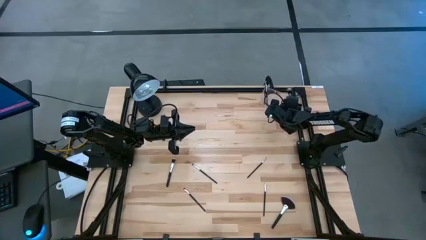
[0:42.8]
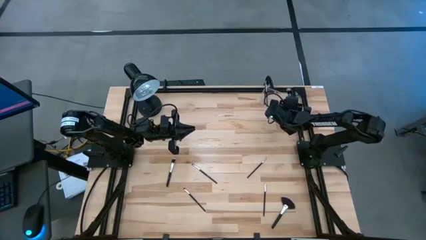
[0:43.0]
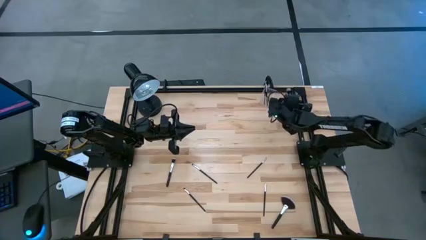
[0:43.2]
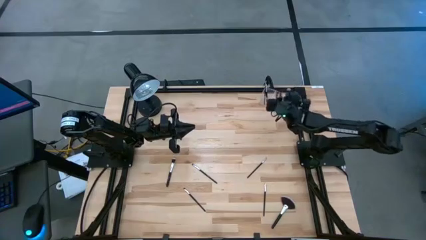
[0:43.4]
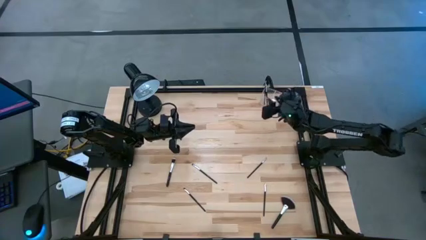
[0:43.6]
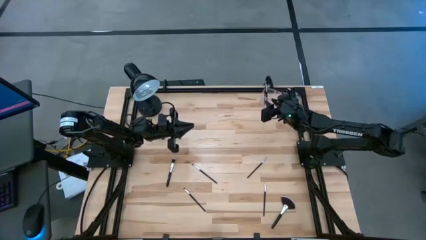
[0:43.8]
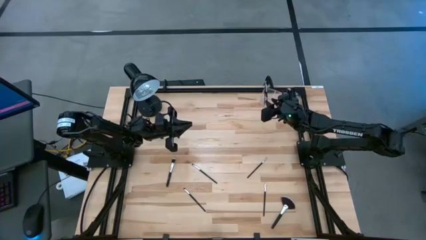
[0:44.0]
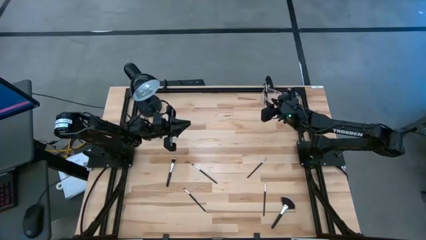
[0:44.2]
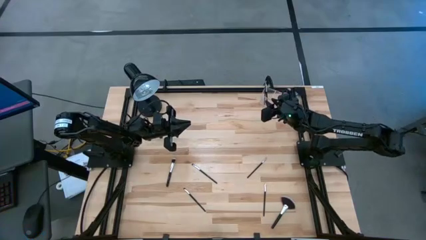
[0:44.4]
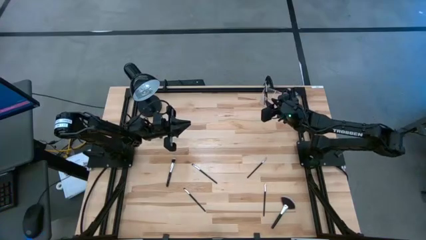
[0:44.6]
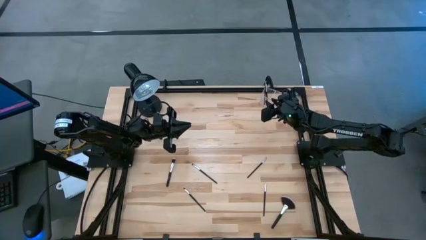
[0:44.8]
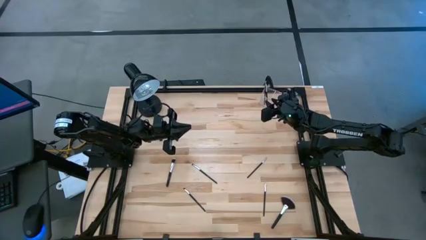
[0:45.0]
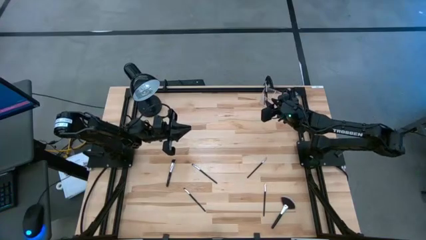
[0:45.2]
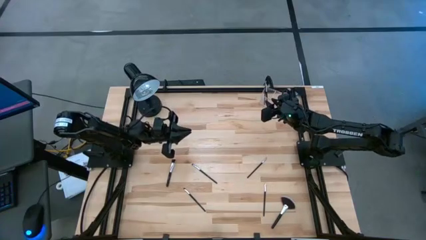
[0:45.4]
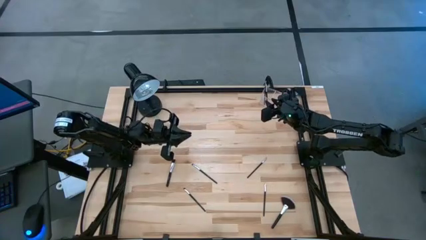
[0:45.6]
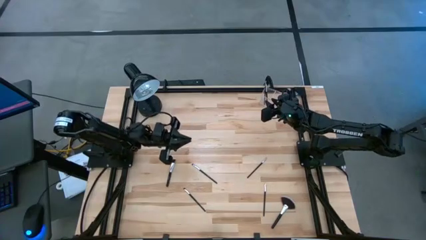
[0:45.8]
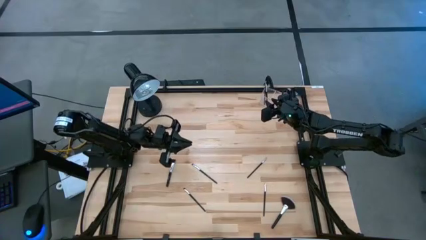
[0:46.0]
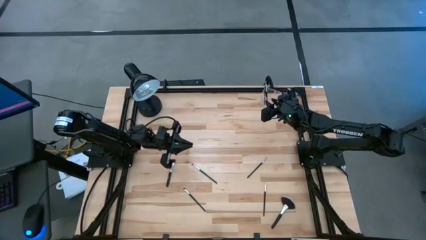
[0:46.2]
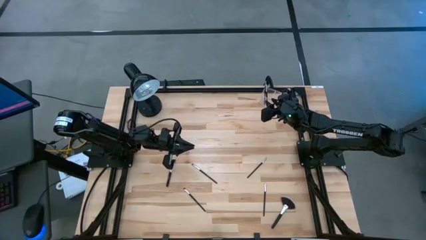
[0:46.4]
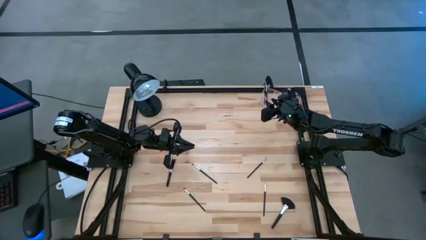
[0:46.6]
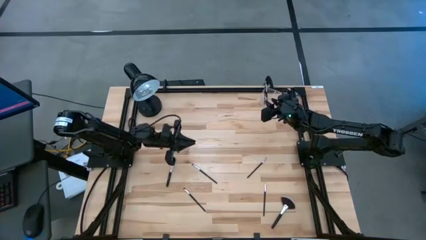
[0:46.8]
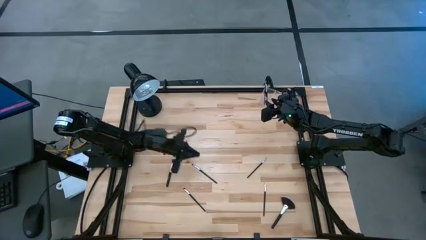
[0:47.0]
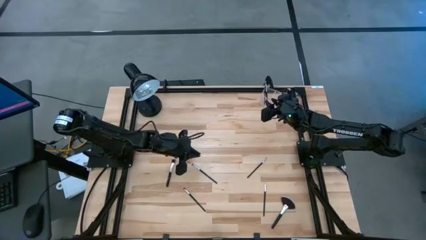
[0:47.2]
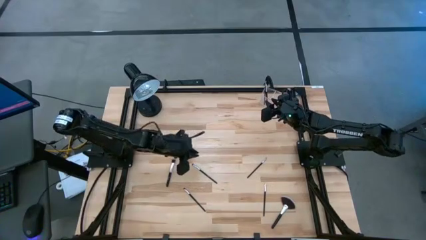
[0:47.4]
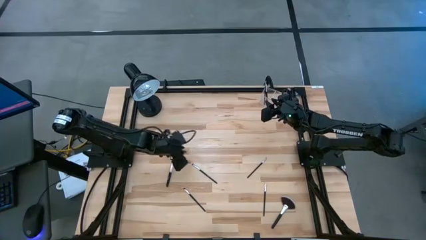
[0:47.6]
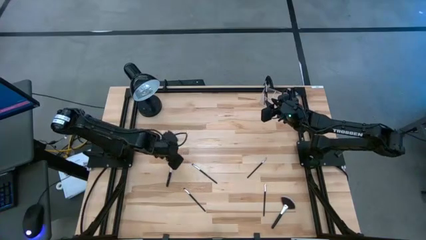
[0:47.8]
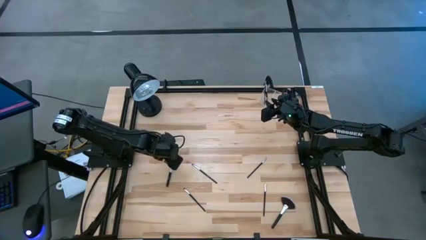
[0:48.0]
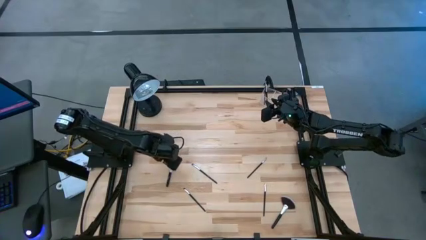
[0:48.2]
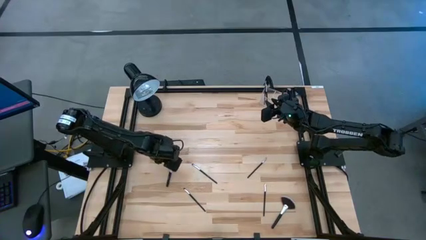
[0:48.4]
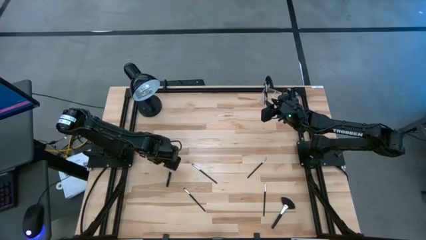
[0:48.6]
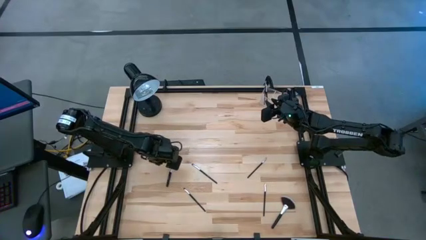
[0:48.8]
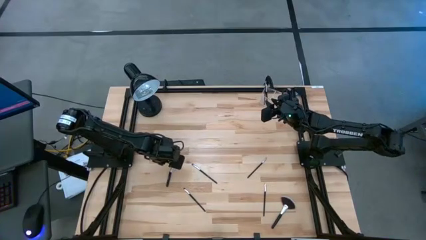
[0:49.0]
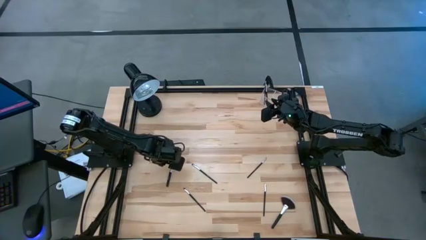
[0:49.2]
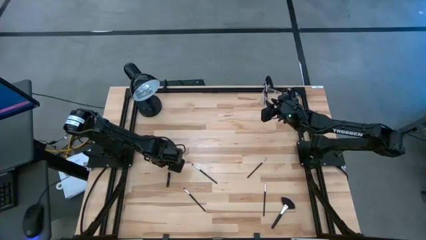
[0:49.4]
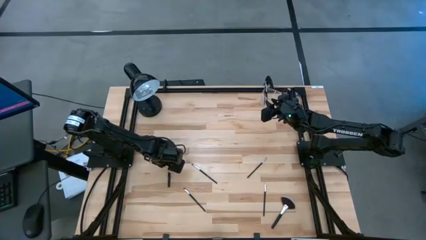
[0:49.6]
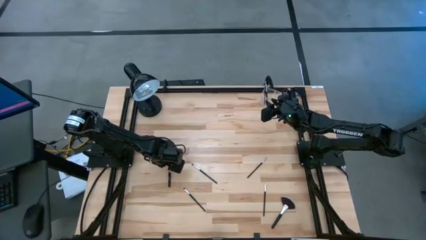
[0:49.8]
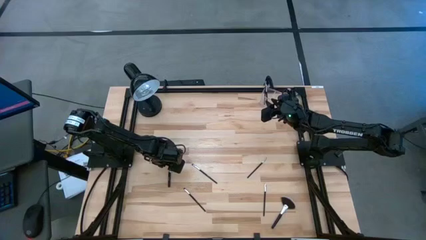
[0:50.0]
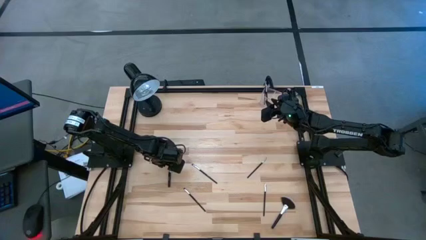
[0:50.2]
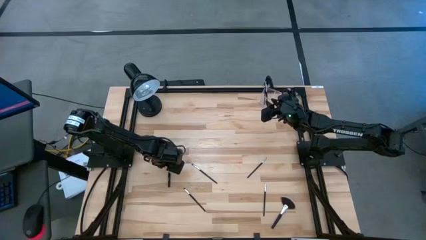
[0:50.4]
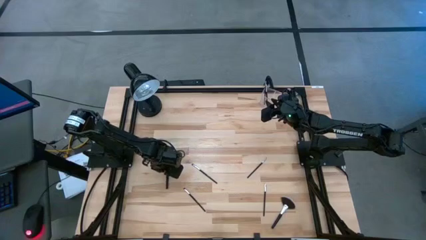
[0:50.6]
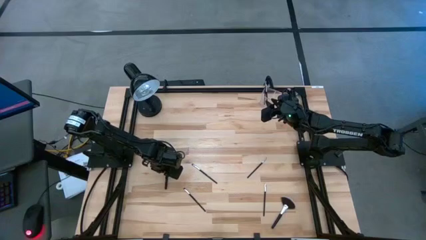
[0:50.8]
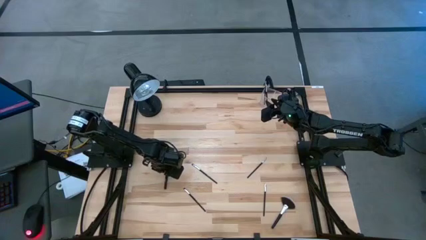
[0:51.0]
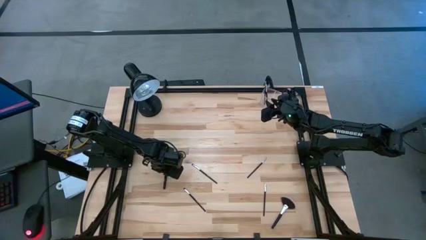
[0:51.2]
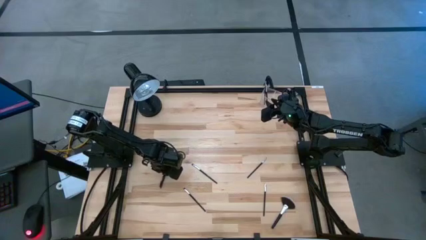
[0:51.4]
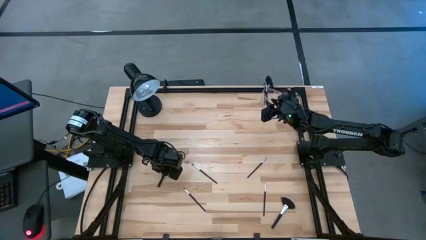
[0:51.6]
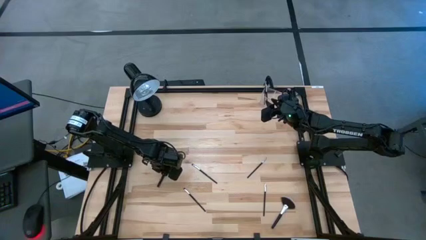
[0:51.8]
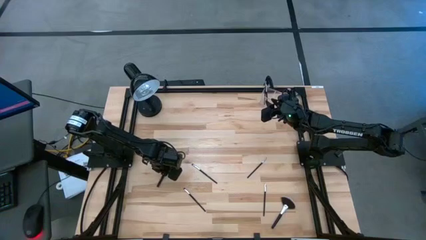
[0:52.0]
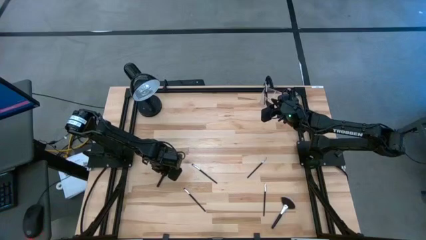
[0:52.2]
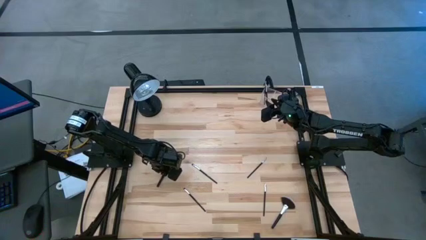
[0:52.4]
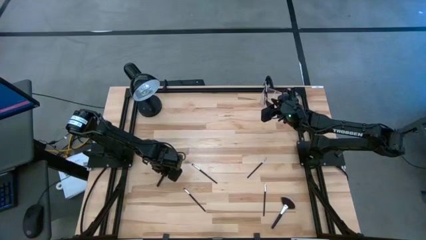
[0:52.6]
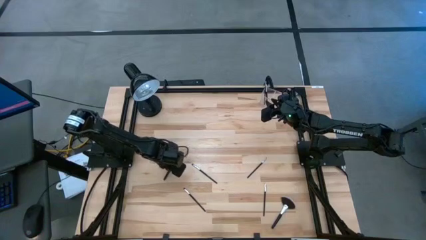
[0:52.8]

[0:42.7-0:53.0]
Task: Sort items
Put the powder brush into the transparent organizer

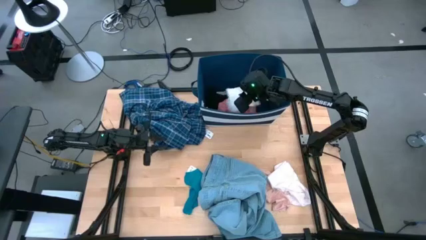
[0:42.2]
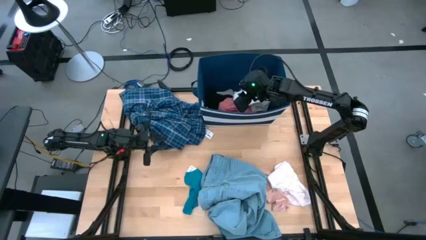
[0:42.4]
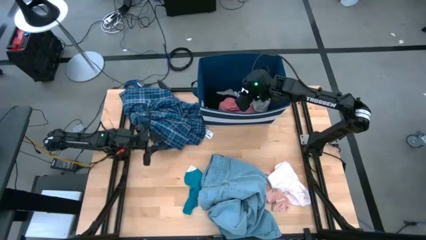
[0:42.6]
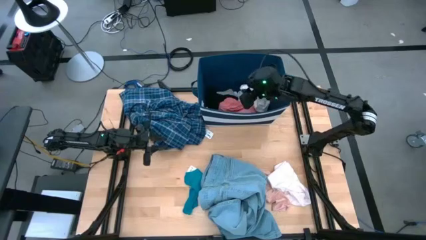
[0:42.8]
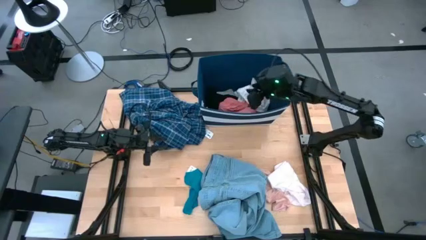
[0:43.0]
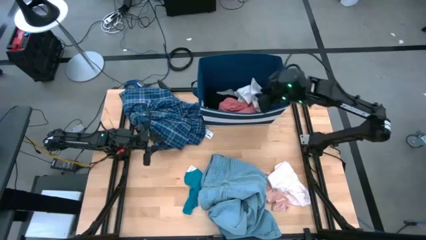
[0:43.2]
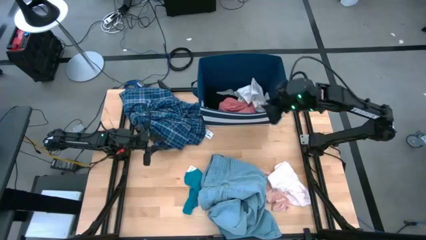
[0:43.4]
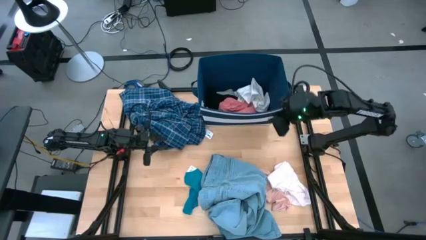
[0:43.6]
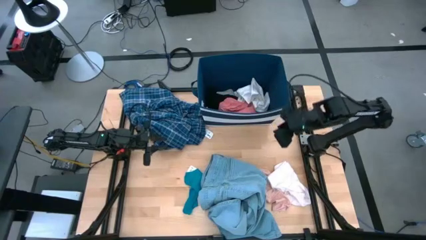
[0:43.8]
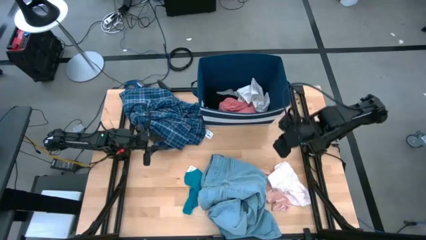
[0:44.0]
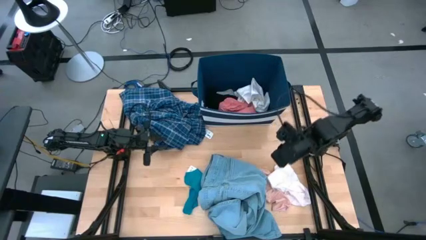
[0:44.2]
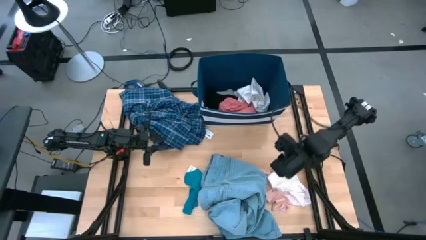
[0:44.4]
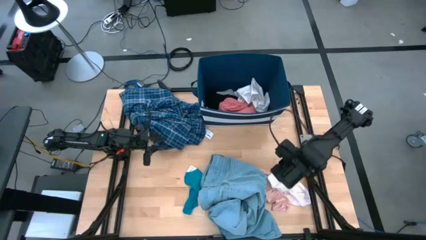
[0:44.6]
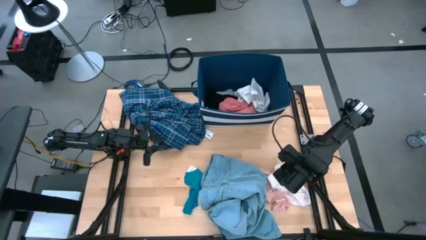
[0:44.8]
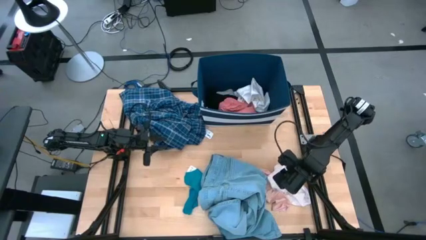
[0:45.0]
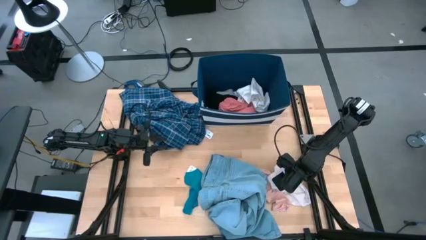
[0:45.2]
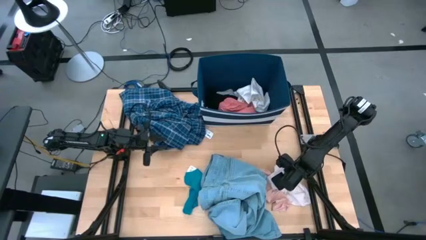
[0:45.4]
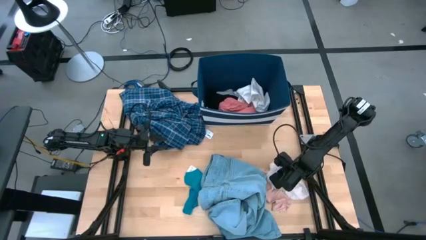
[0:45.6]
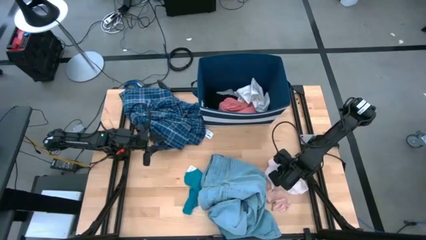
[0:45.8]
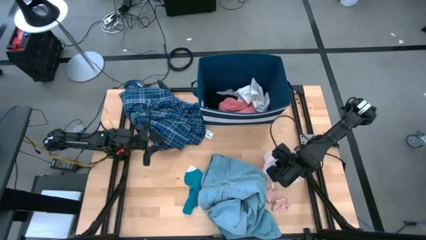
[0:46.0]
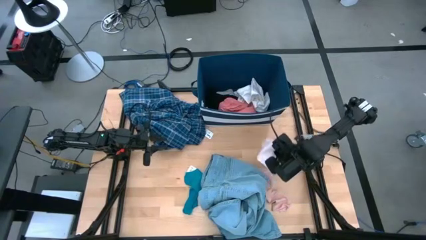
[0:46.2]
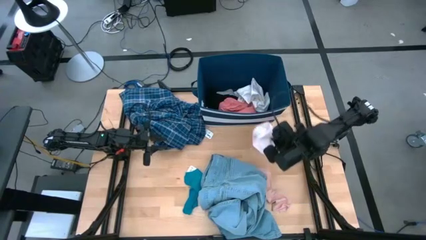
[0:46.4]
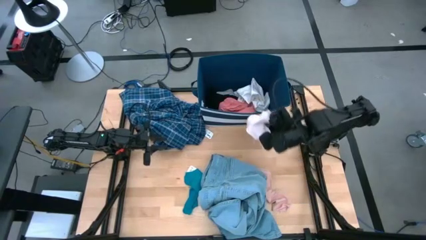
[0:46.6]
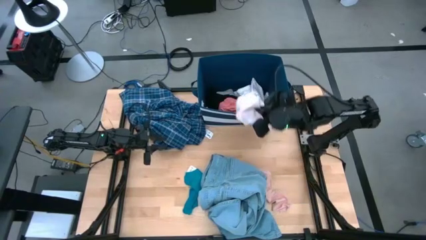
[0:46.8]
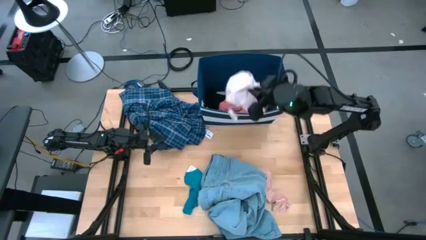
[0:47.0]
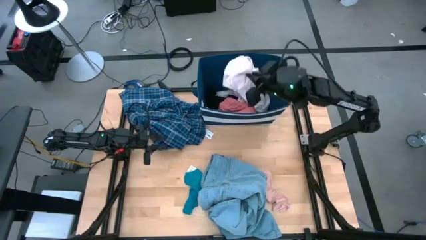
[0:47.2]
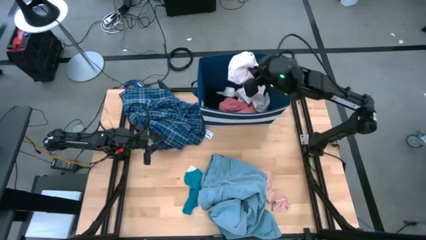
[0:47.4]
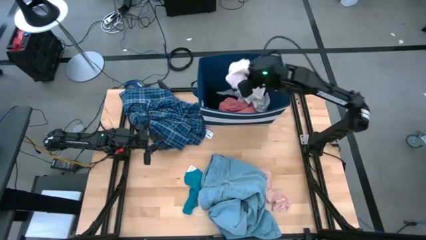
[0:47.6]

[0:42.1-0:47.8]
Task: Sort clothes
Put the light pink underwear into the blue laundry bin
